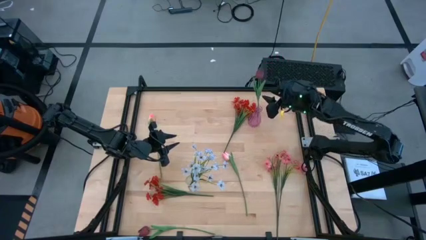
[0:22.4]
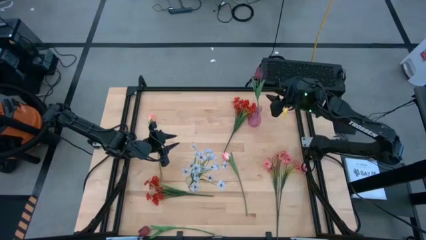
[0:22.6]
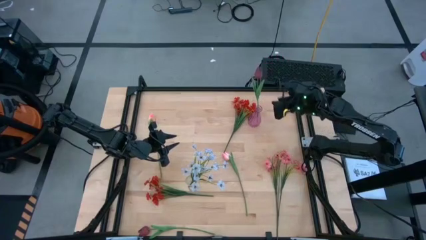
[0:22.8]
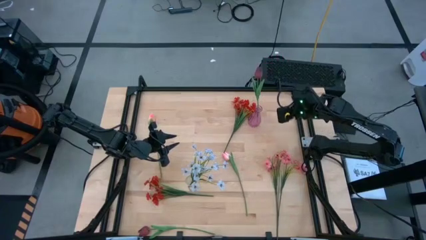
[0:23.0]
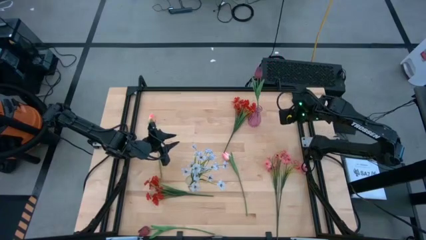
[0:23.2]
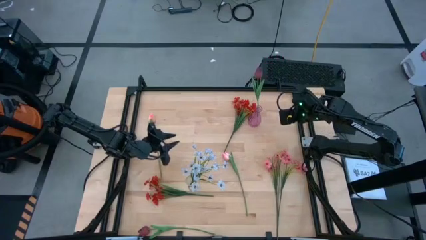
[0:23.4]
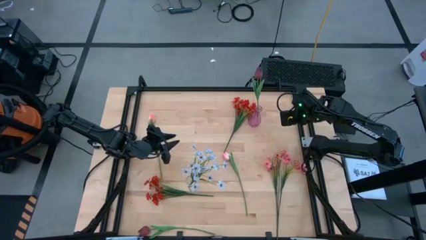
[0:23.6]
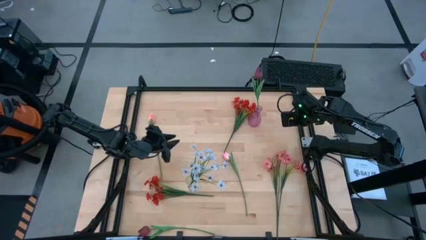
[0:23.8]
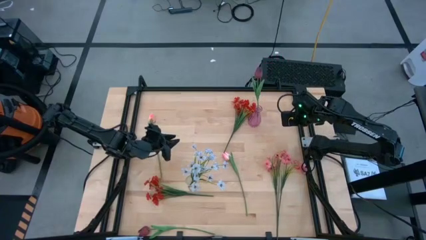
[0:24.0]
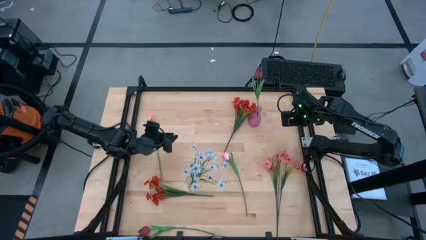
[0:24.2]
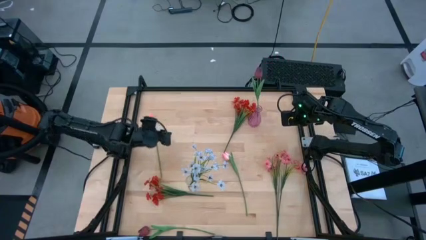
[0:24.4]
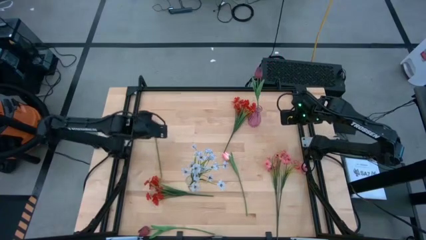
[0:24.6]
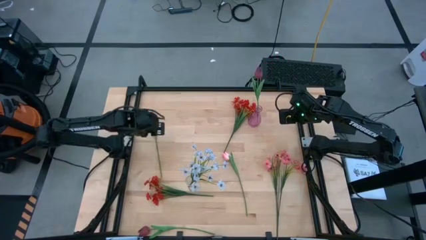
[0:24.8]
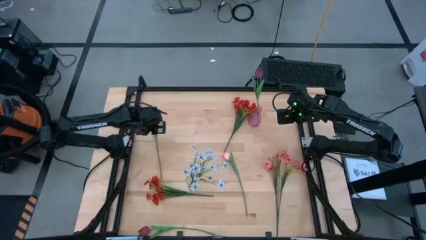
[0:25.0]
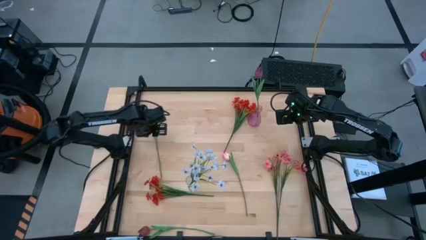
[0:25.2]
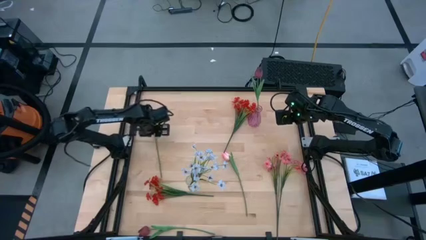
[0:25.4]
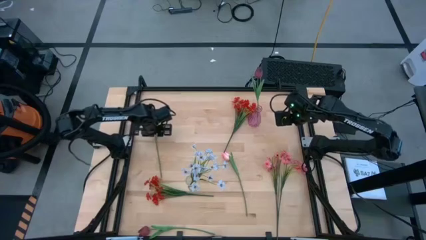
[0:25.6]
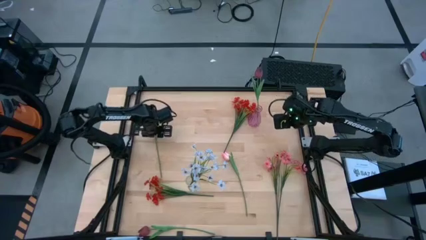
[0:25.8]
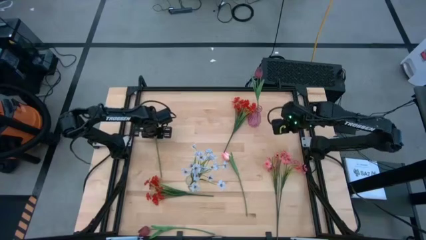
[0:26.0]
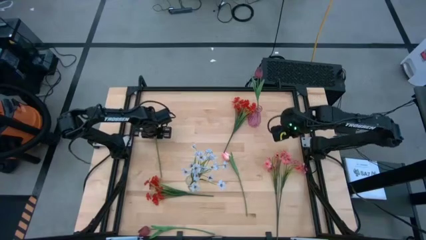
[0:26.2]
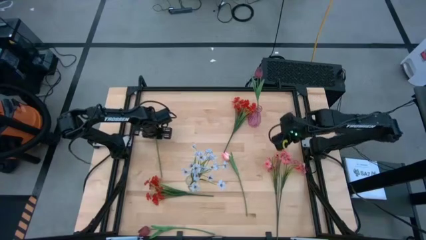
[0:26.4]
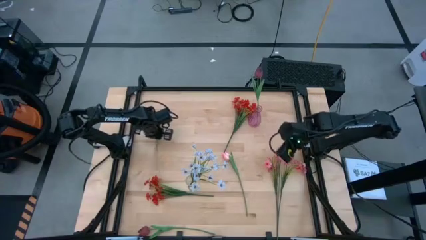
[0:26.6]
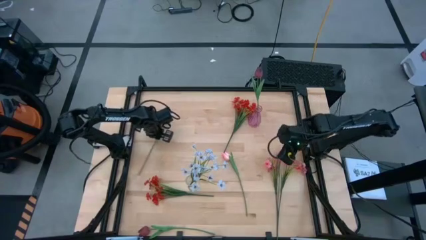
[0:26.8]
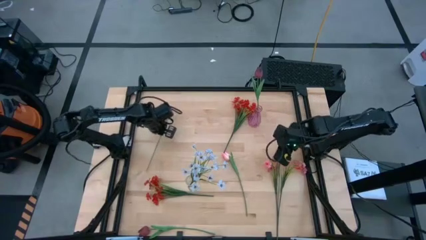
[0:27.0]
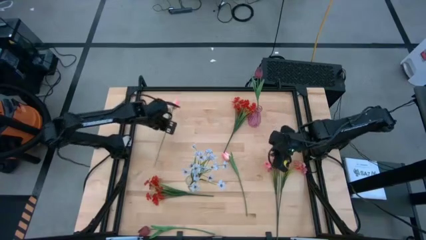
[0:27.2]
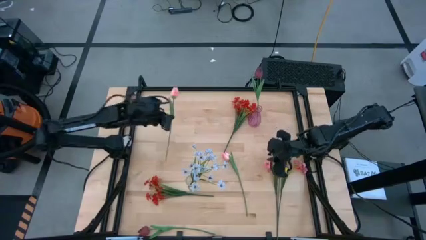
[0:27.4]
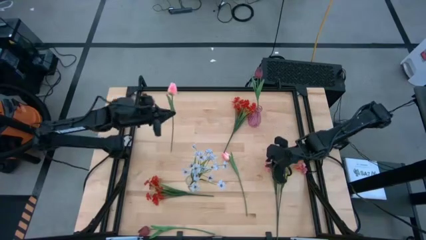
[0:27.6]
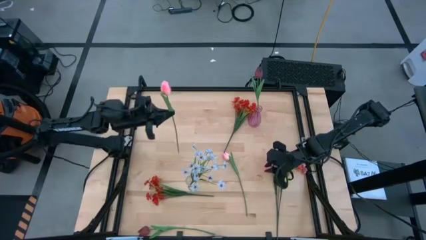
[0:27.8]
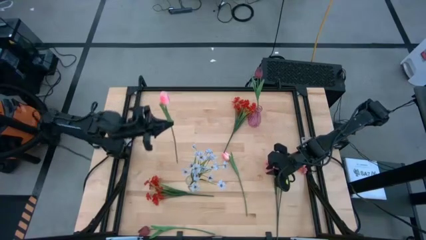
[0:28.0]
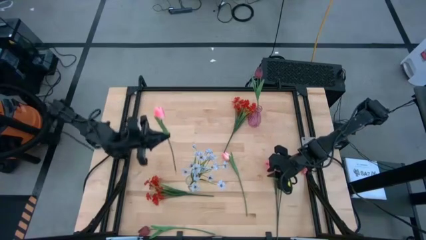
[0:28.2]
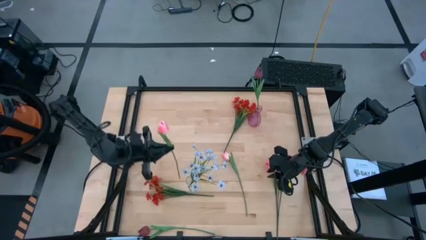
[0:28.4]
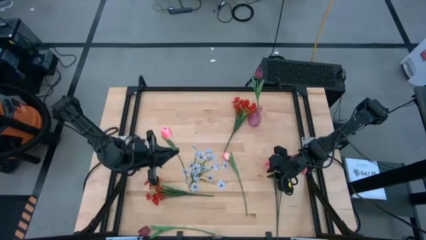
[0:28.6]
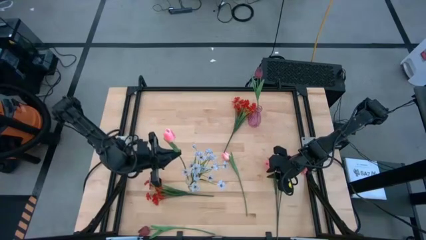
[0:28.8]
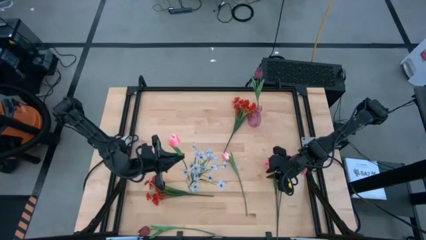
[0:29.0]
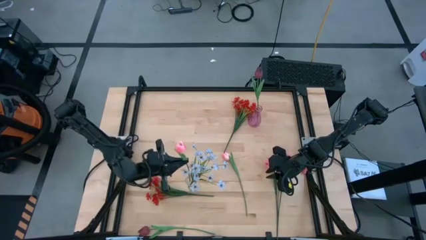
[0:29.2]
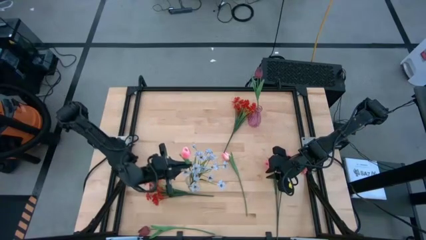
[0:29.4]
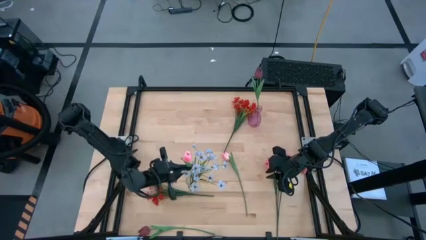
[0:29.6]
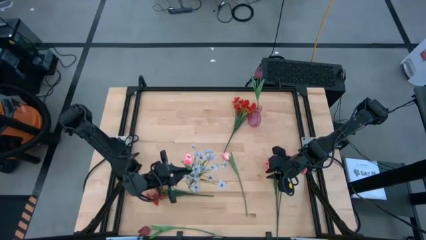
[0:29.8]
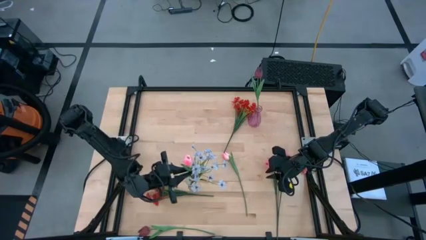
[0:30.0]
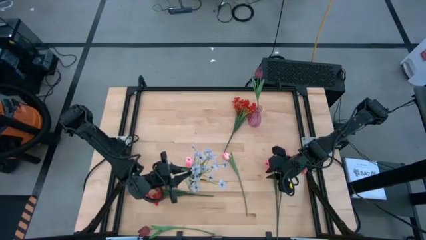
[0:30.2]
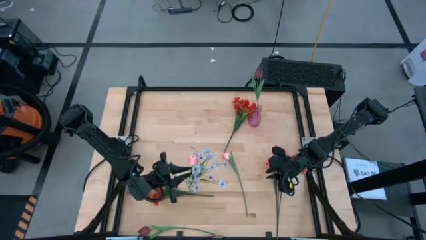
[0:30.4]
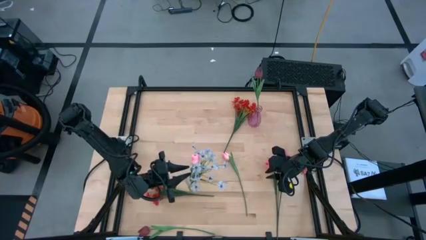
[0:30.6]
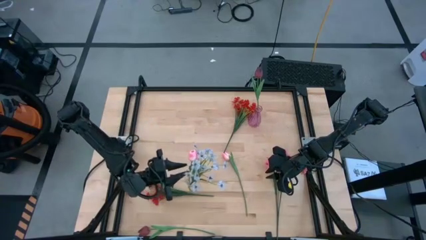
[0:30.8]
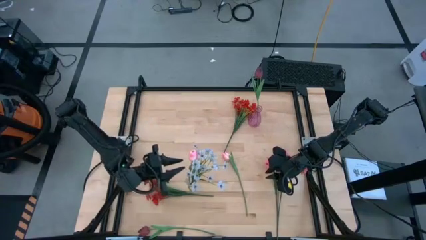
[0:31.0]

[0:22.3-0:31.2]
Task: Sort flowers into vase by color
Put the left pink flower into the transparent vase

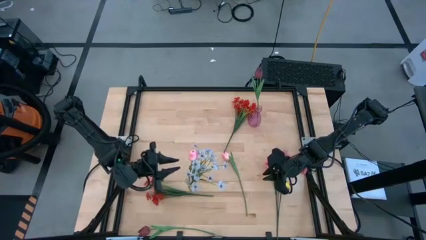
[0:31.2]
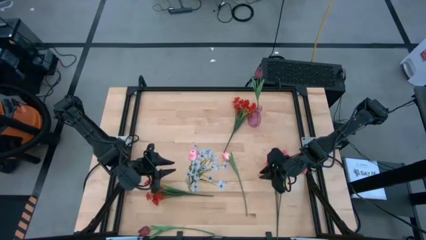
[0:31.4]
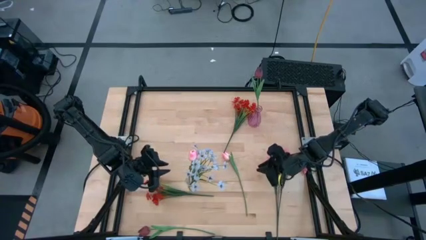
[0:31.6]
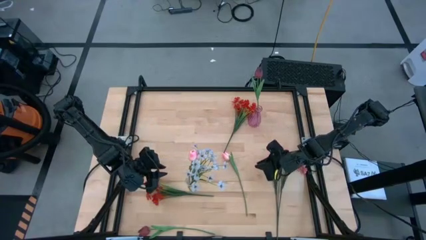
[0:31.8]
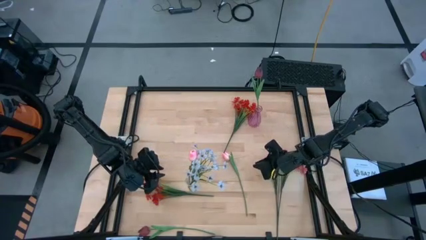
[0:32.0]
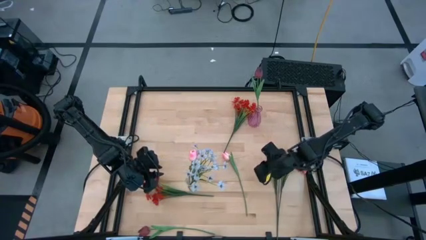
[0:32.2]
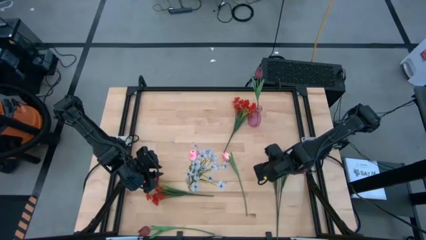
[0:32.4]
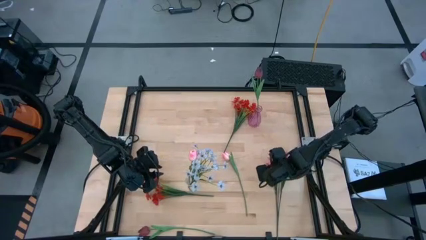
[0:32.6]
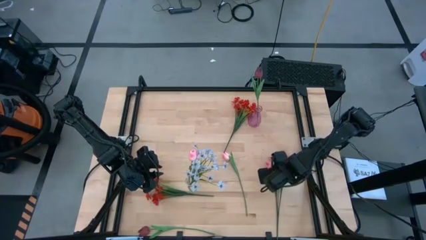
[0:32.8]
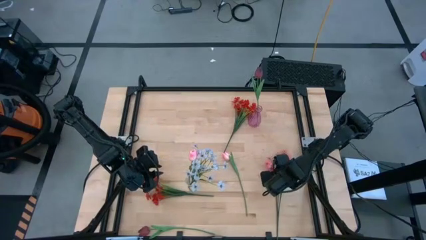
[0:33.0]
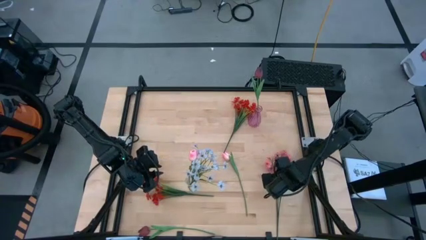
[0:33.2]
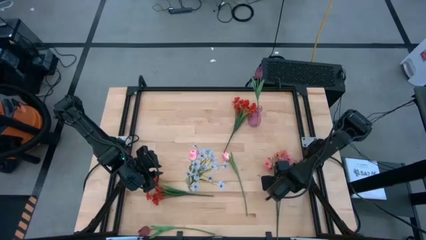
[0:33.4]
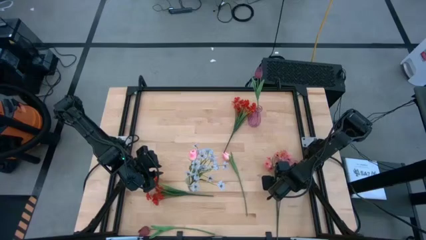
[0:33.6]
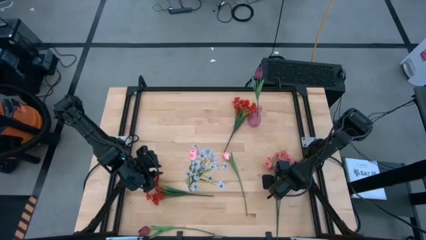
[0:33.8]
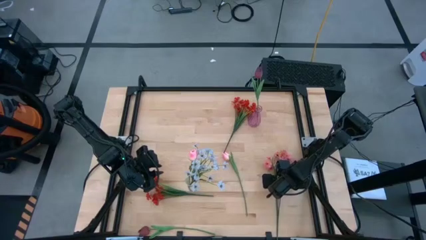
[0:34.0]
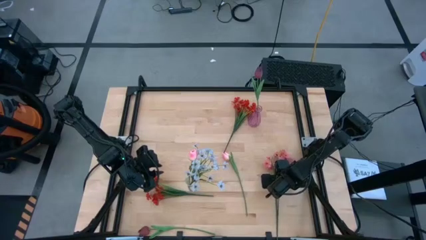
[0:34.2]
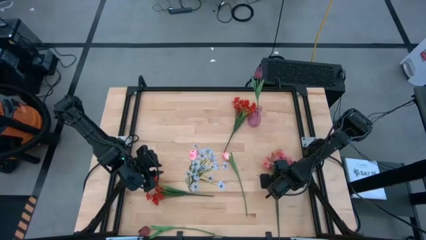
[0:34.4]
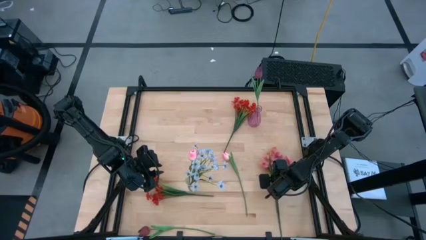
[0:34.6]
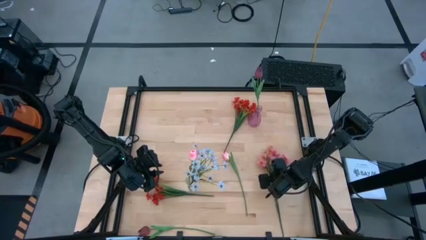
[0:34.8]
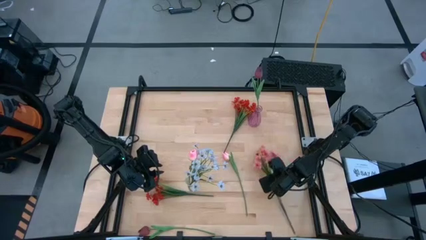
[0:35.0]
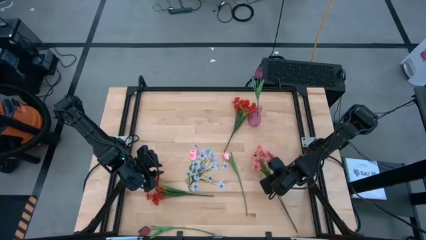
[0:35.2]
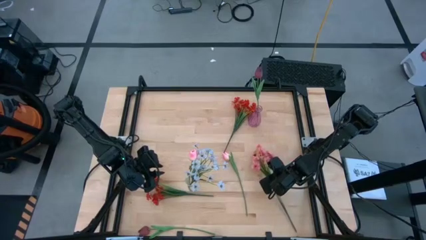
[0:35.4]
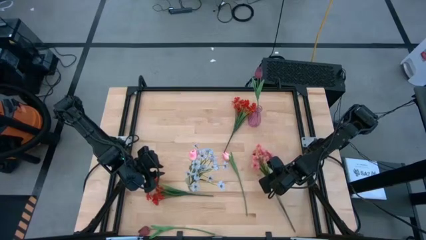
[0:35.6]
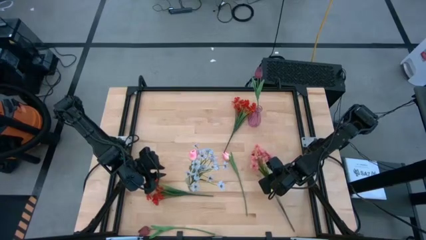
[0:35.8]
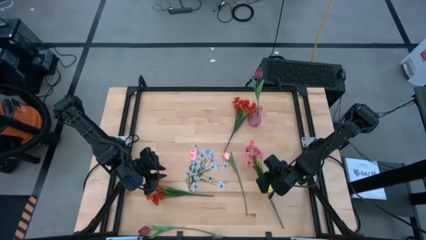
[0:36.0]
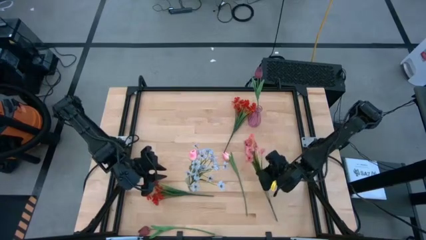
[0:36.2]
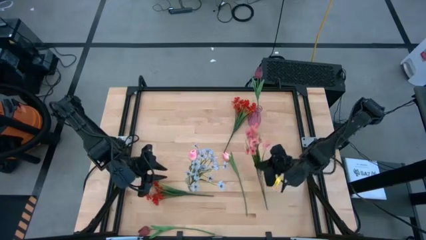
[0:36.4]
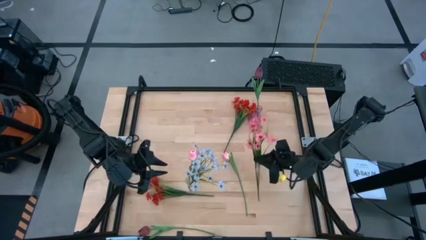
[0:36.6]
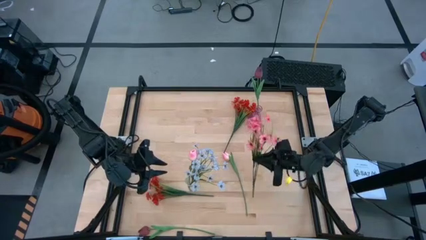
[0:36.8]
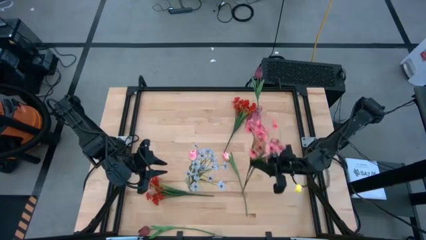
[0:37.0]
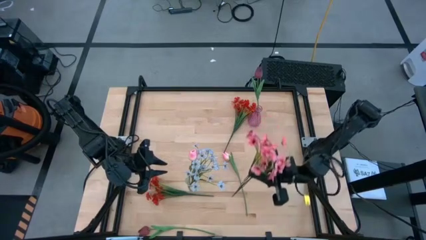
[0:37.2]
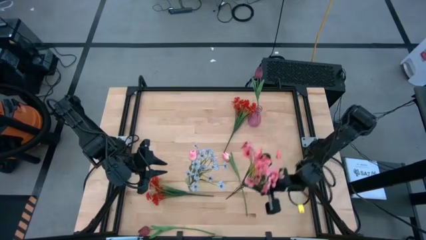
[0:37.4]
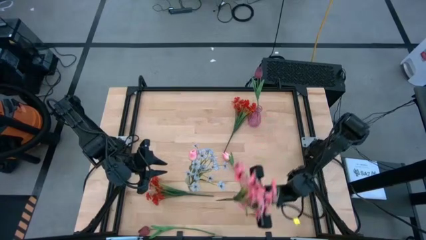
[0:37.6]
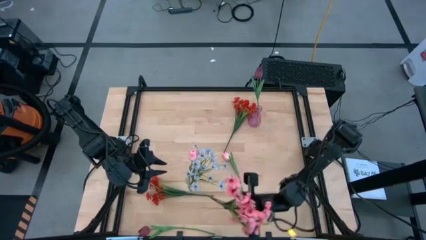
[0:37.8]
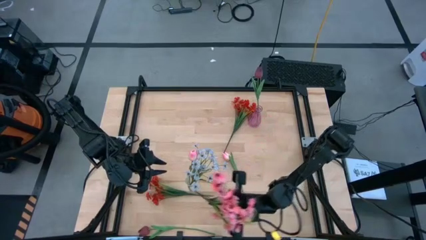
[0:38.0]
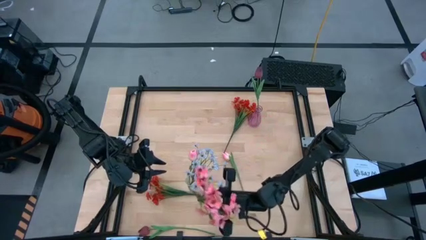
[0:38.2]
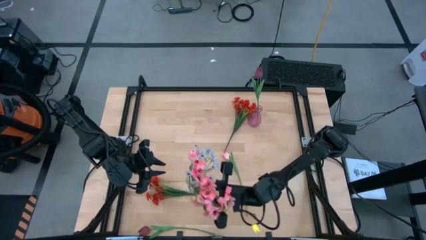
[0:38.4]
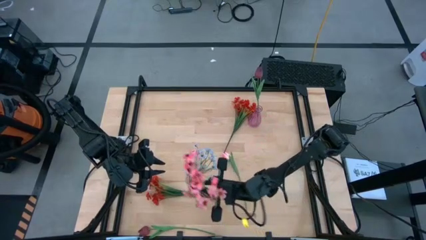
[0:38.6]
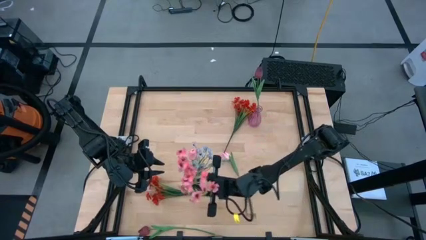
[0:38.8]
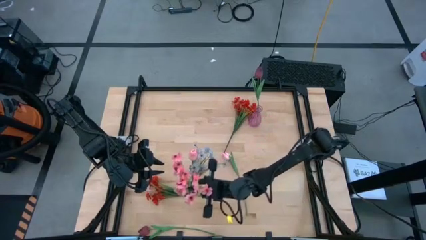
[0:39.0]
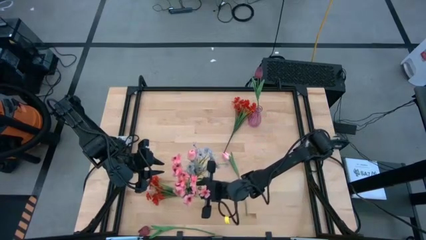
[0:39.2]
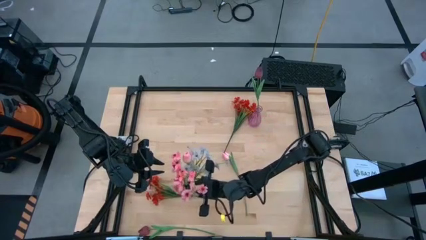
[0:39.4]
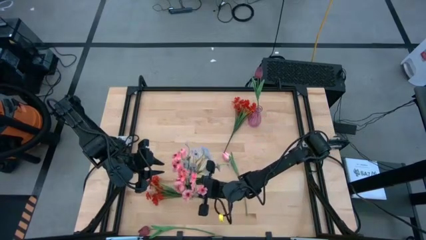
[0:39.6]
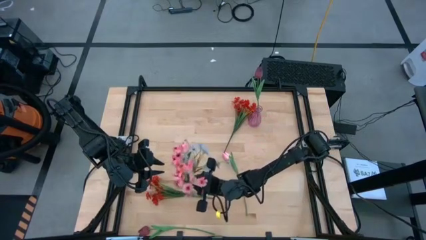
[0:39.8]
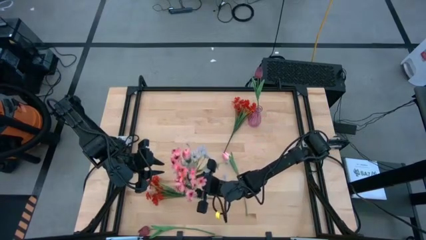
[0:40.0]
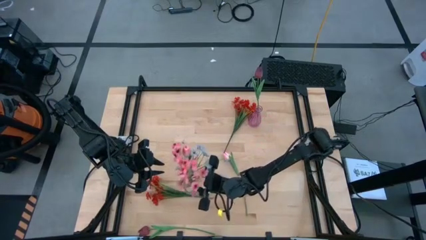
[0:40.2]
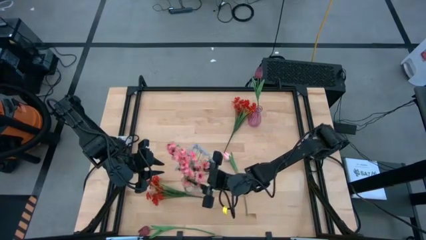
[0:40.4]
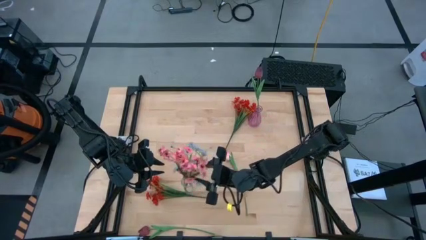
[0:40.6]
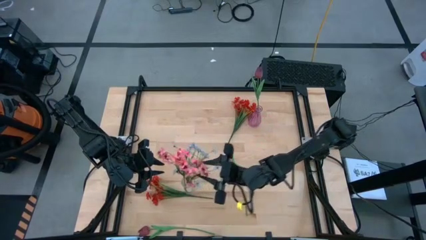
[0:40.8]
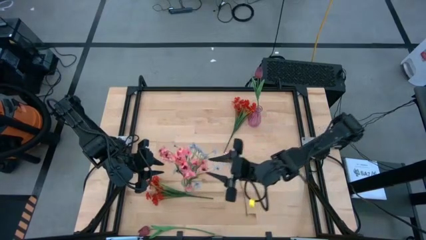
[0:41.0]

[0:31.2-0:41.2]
Put the pink flowers into the transparent vase
